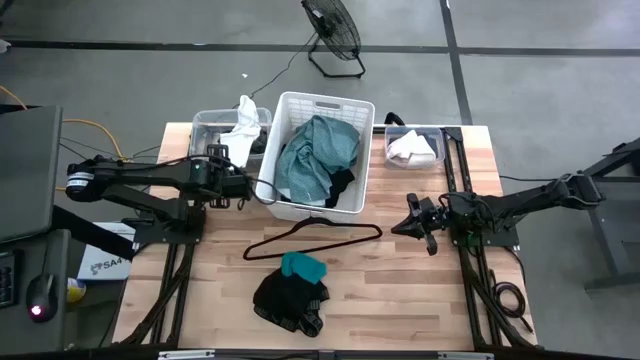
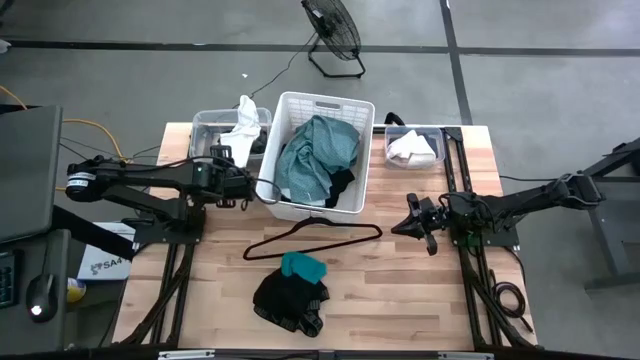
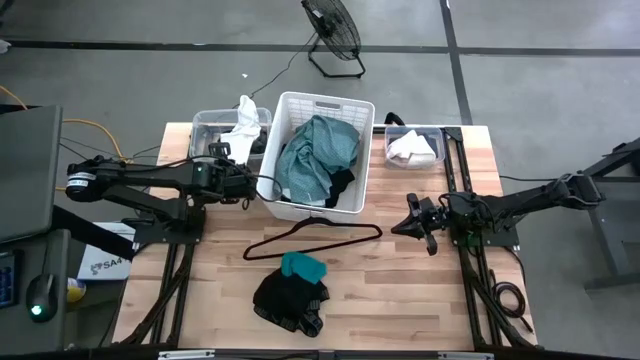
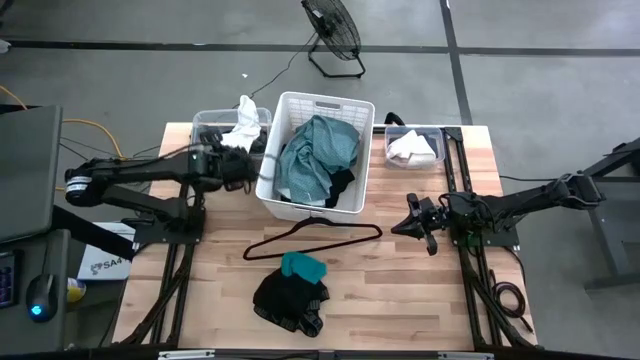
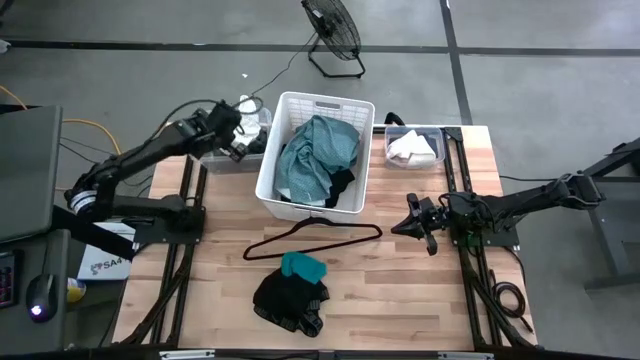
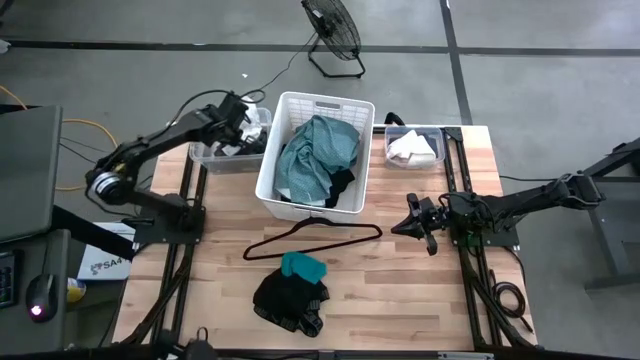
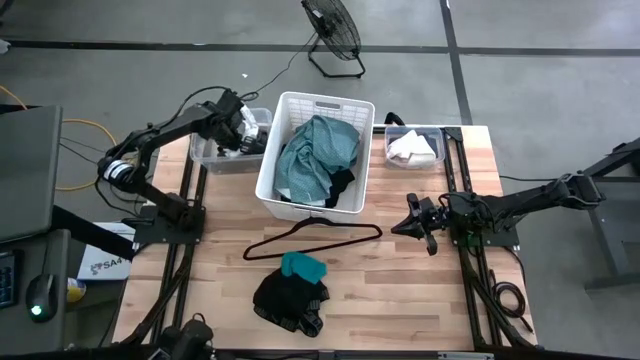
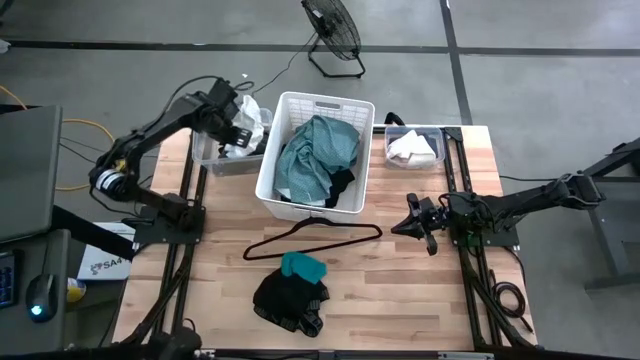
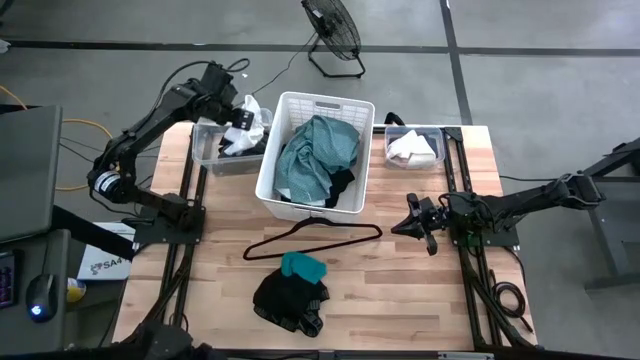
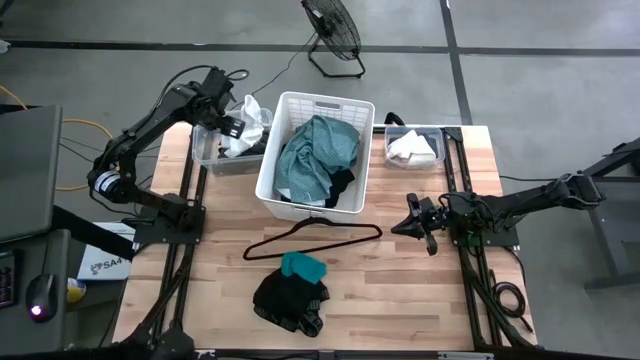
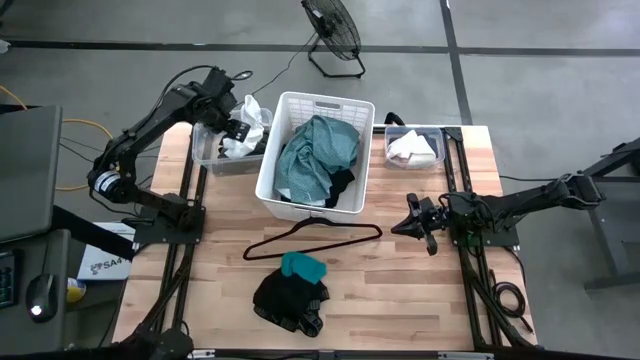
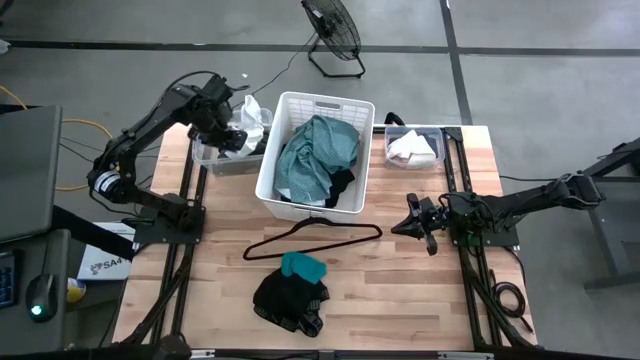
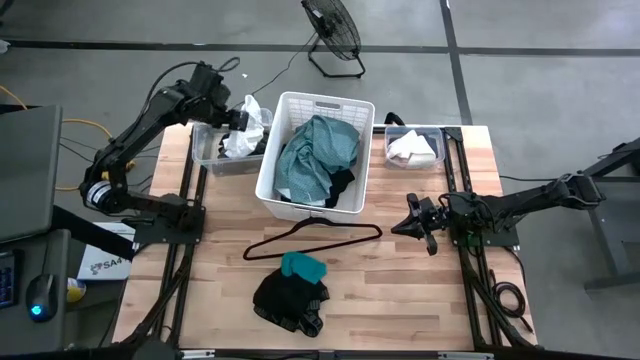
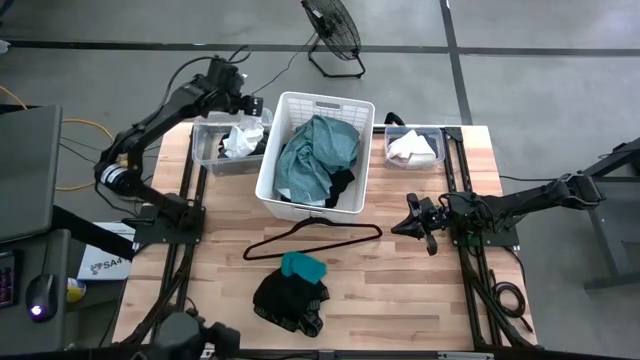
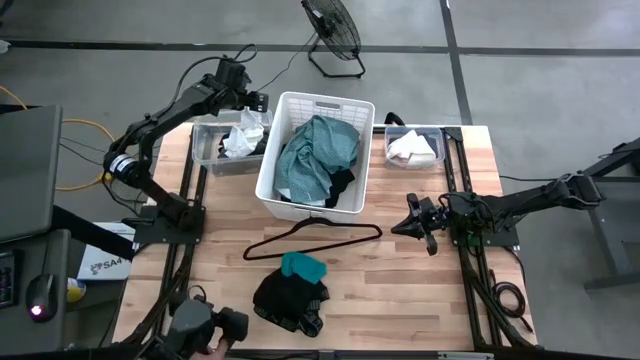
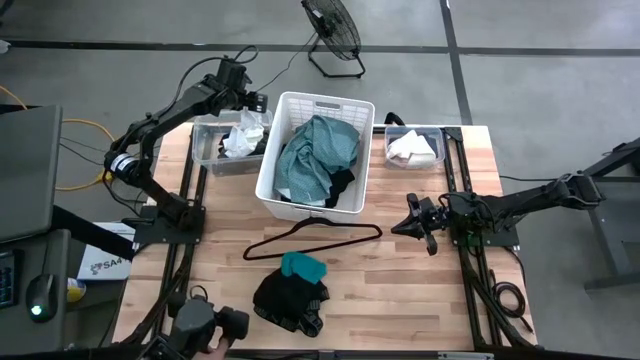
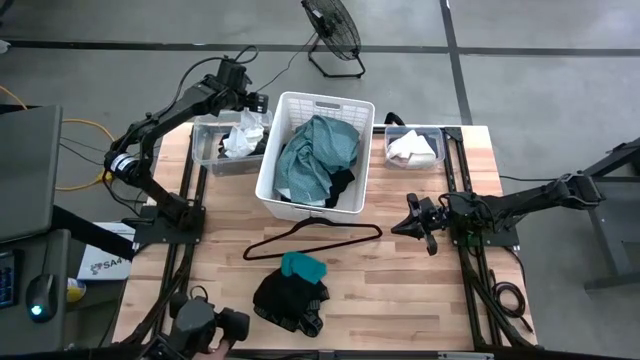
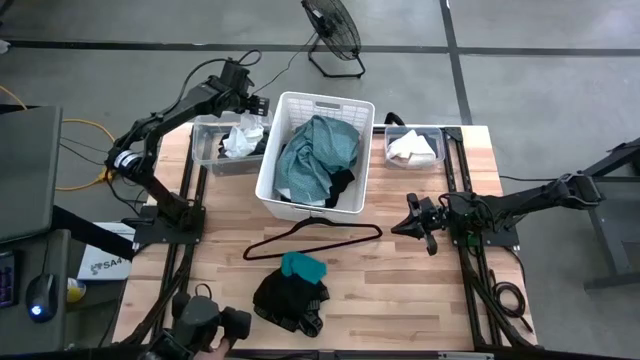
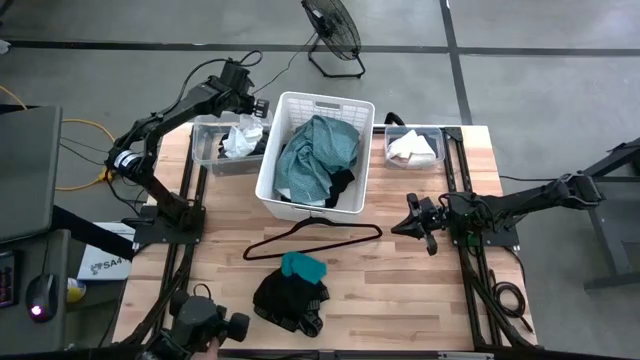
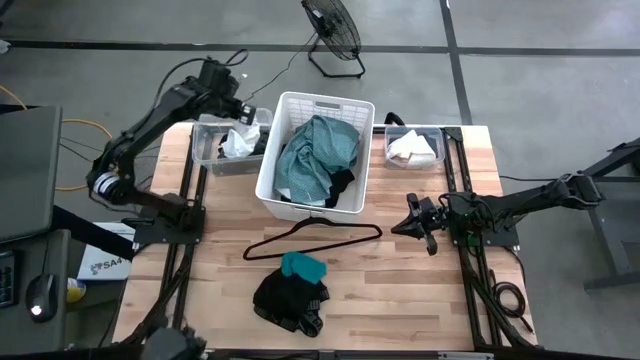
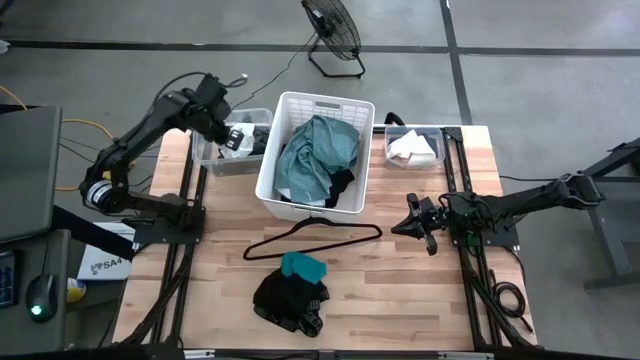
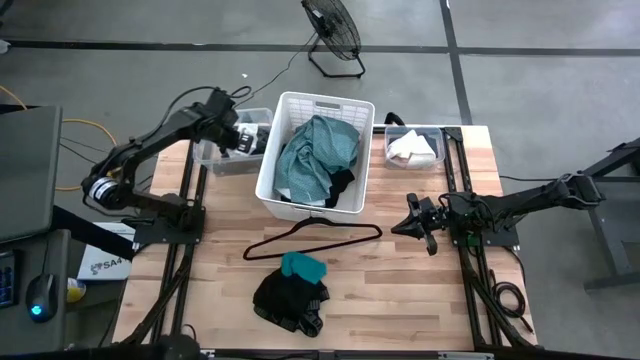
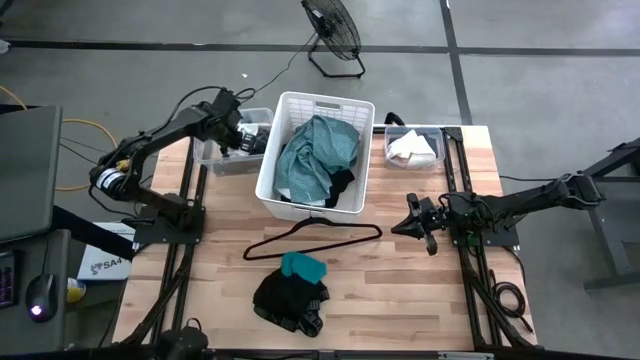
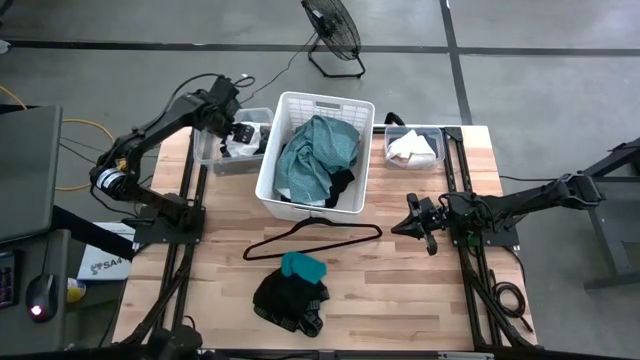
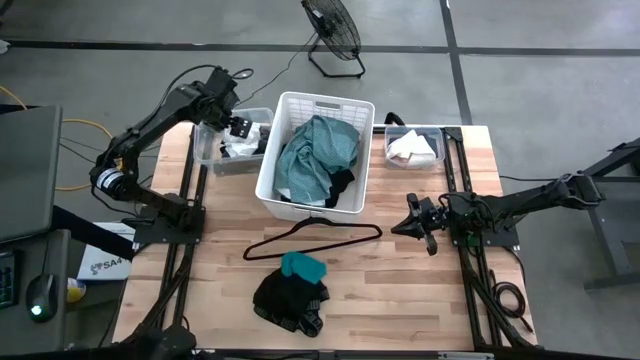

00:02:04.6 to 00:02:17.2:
Task: Pick & Place Cloths
Put the white boxer short into the left transparent bin

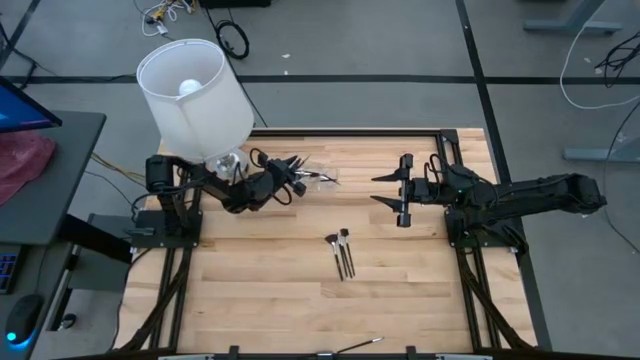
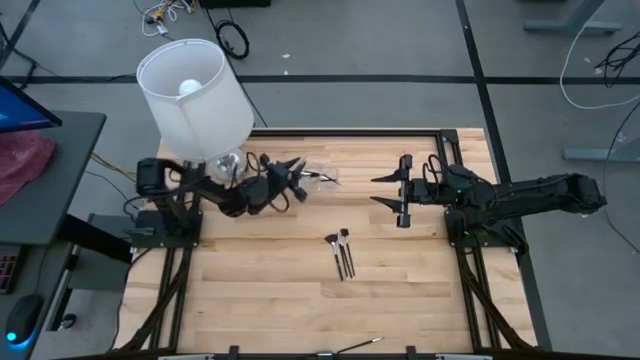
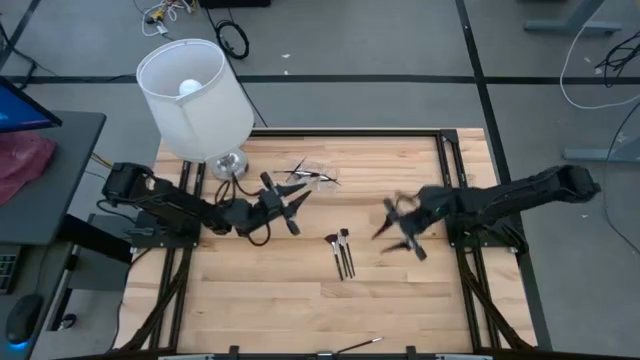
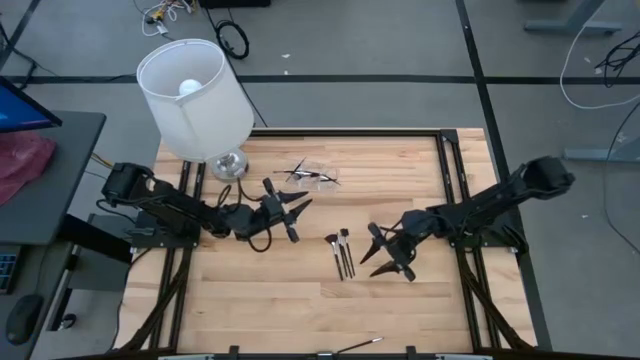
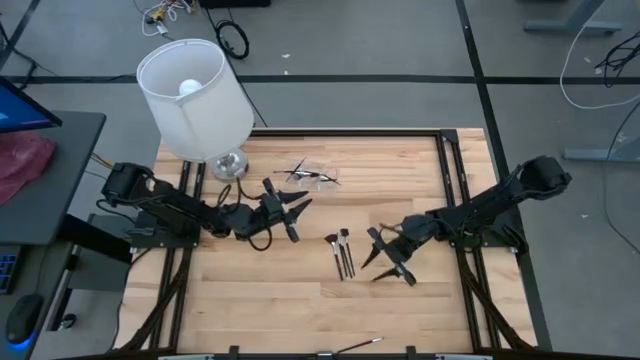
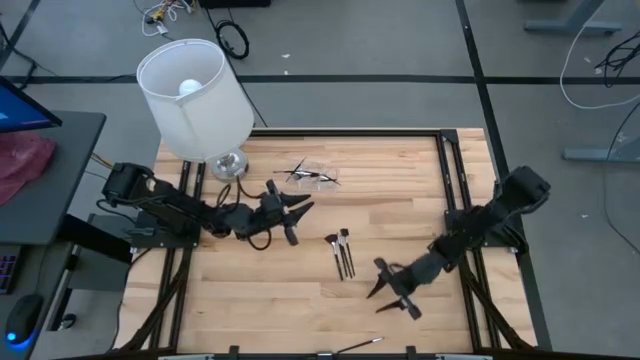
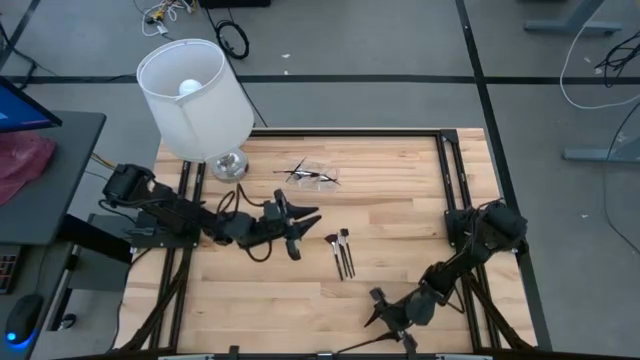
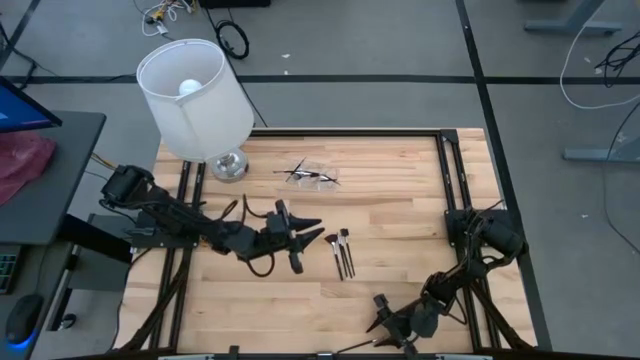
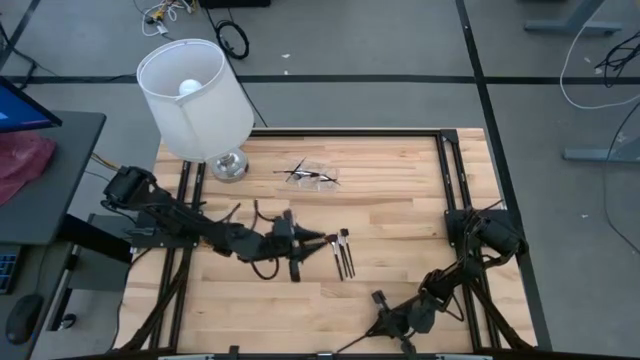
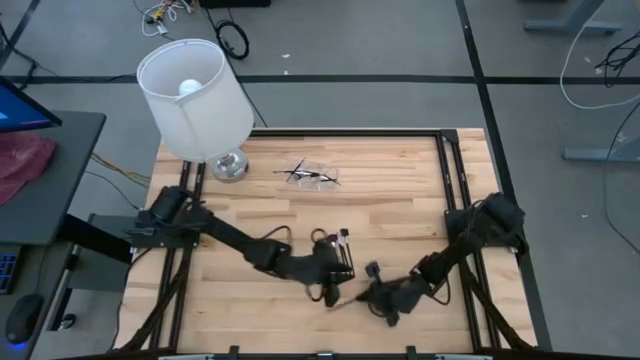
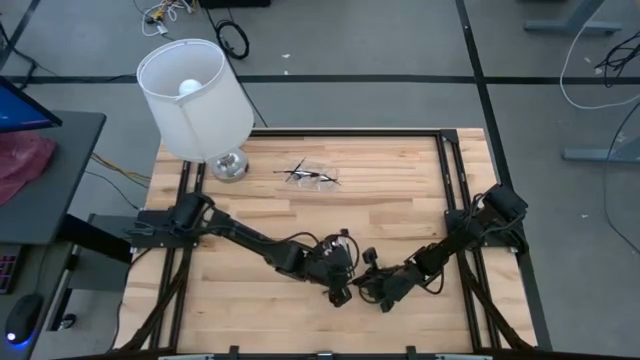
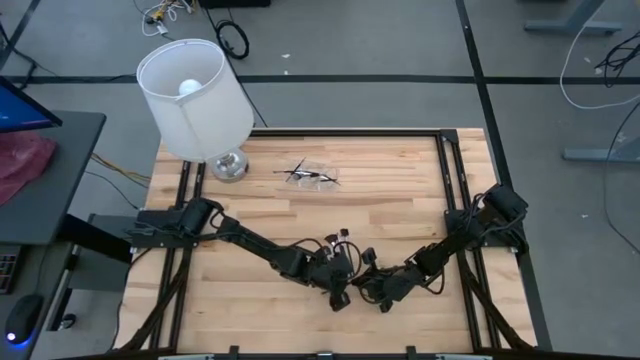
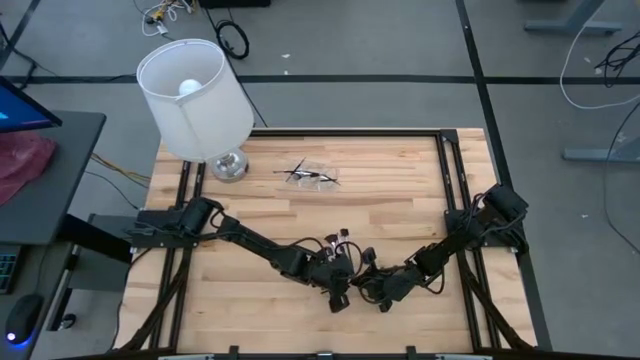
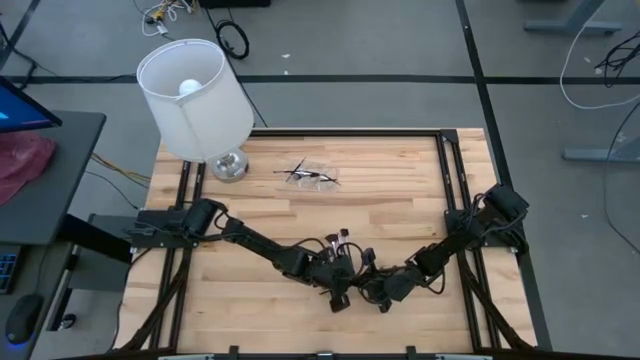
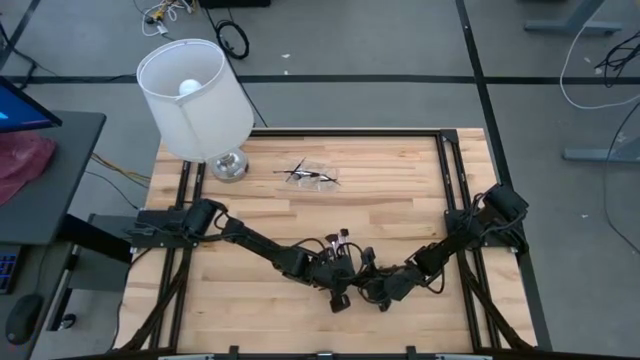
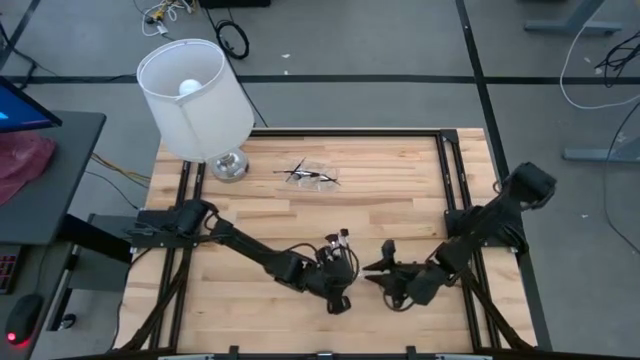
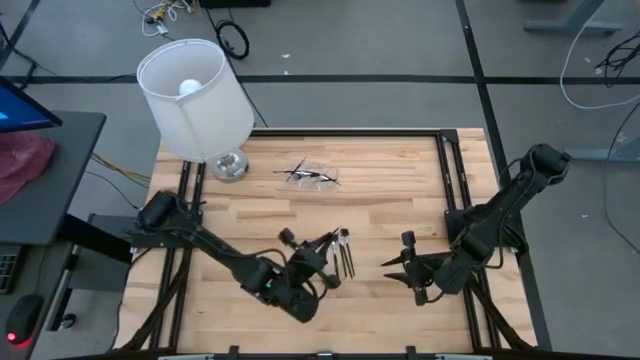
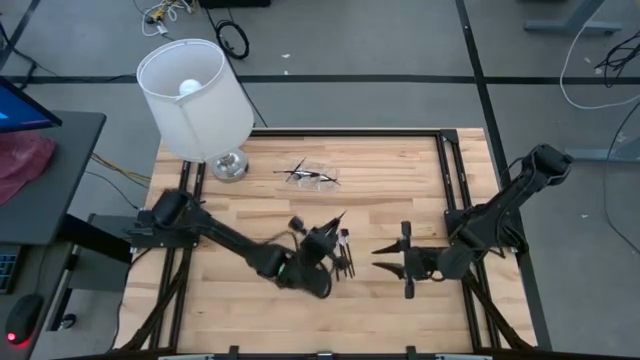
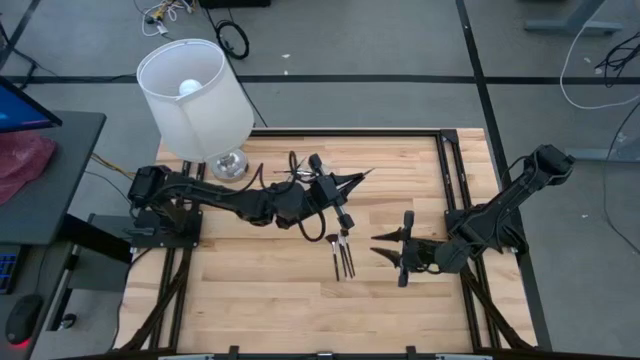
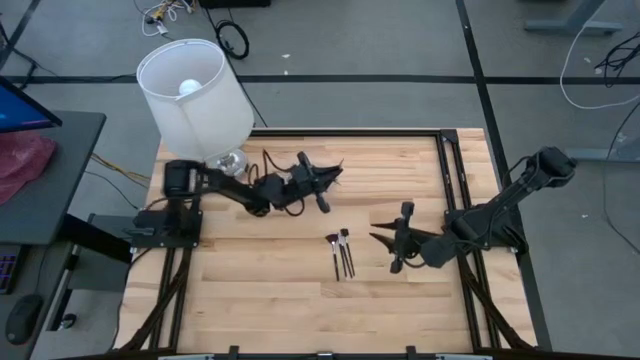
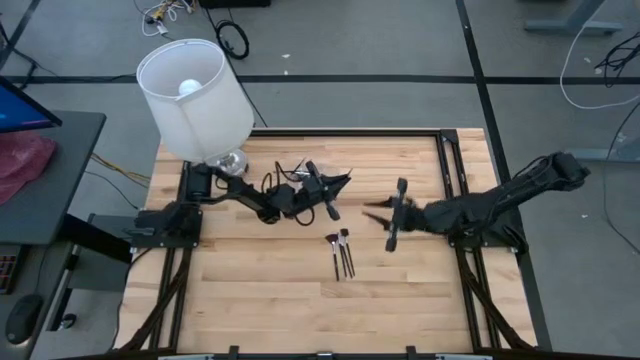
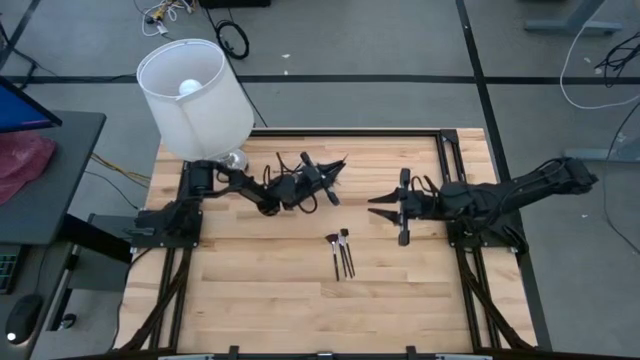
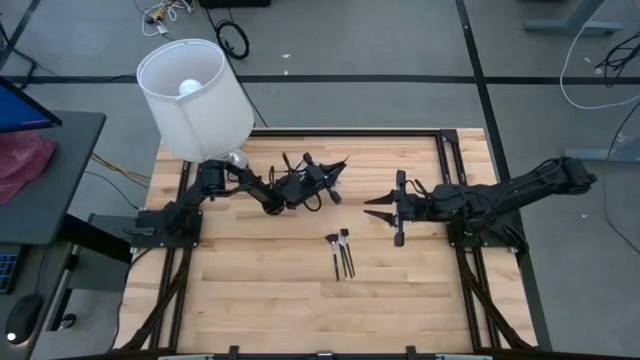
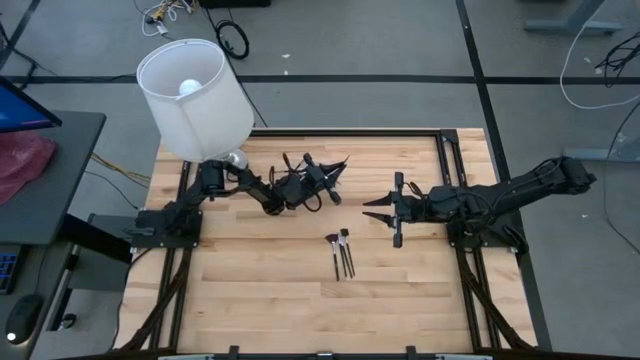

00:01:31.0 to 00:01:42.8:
Task: Put items in baskets/containers
Put the black eyeliner brush into the transparent organizer
